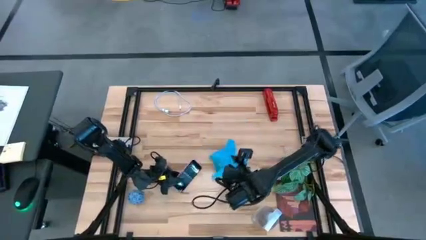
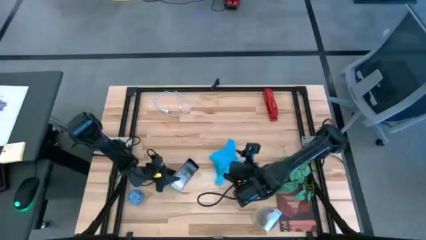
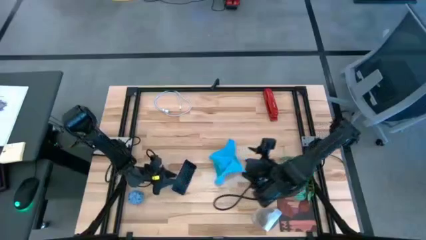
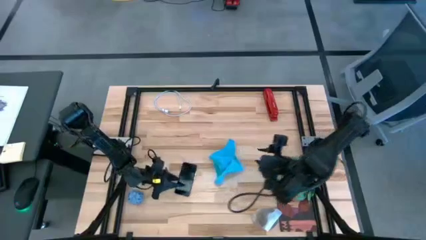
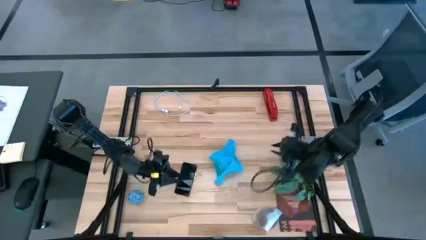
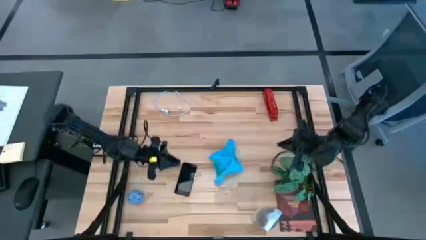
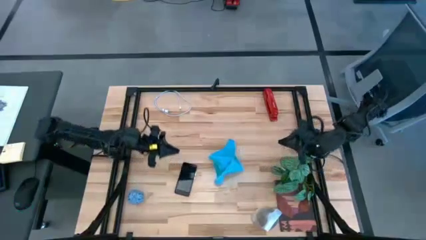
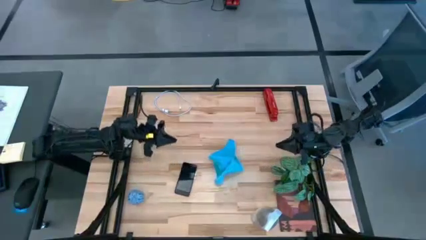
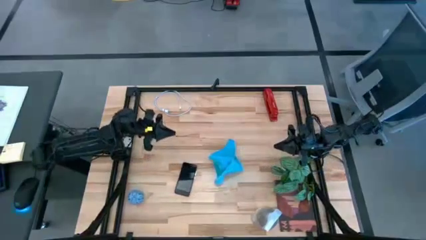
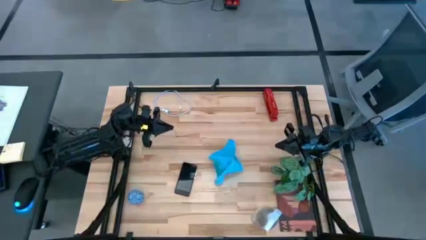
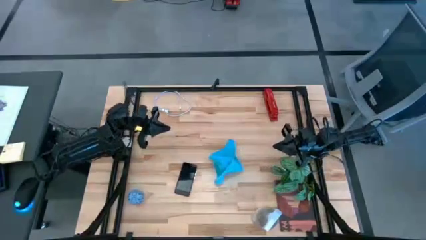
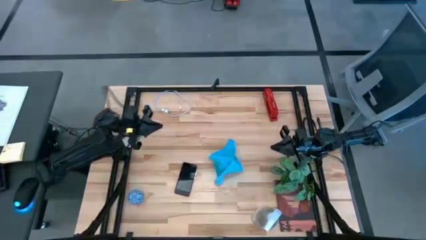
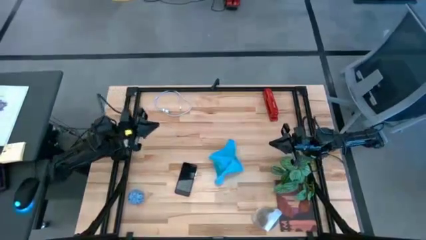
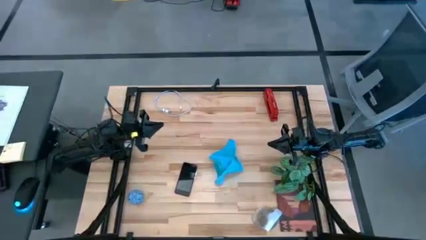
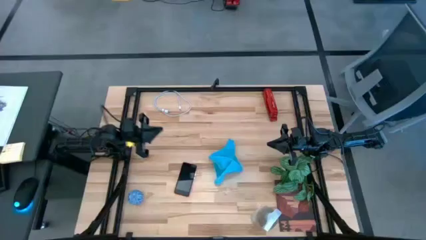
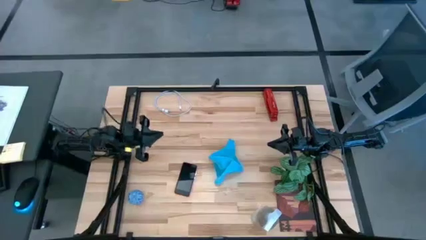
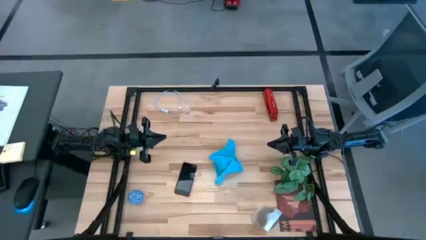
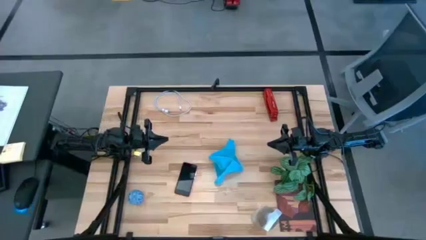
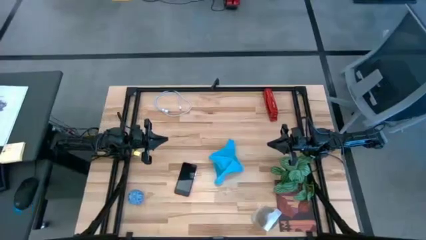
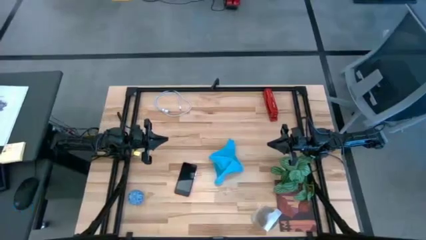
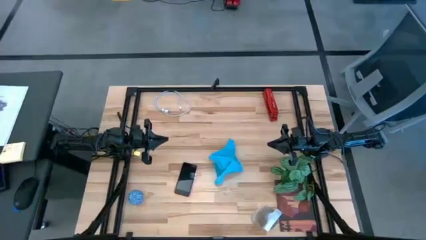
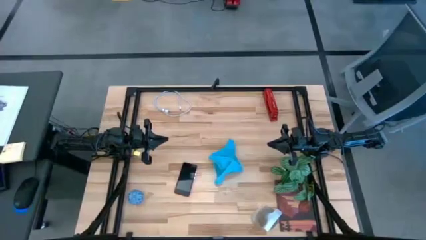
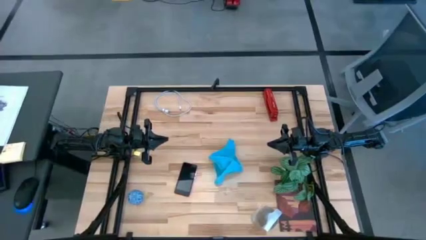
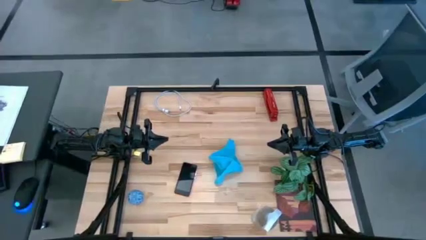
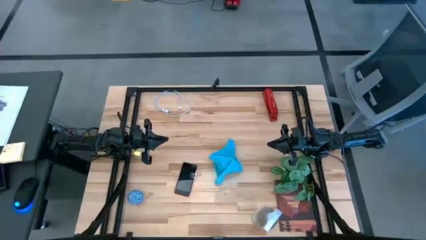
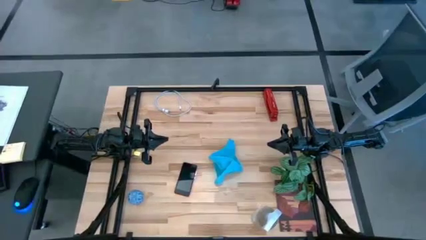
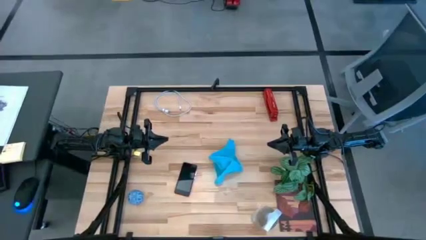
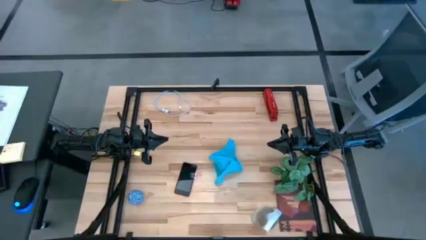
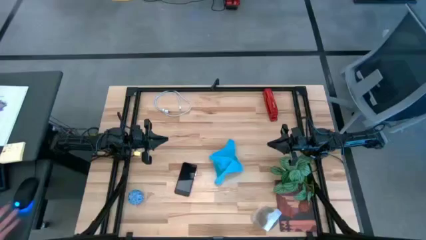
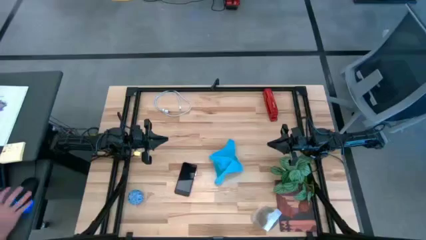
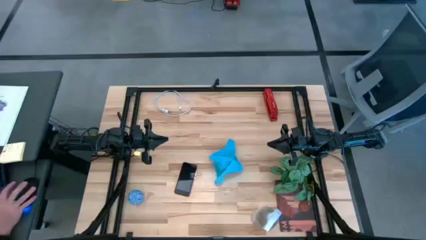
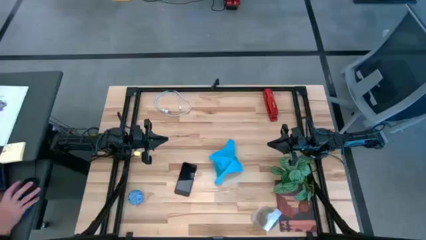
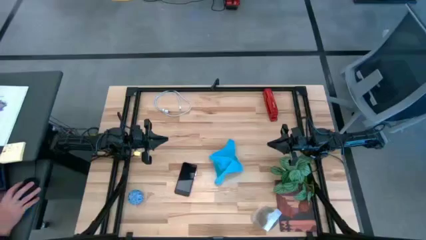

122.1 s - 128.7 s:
Task: Apply microfiber cloth
Return to Home Position

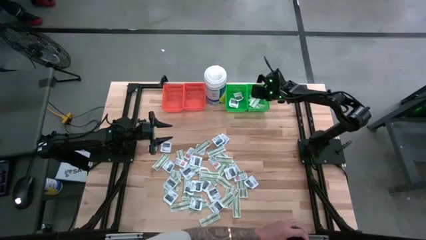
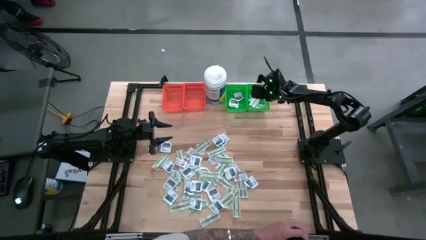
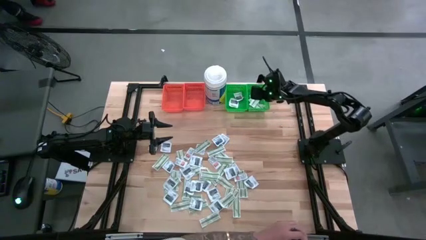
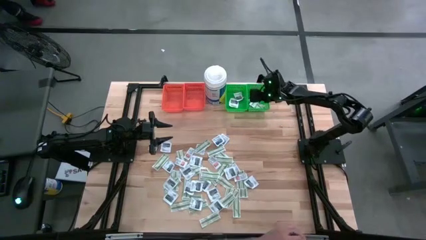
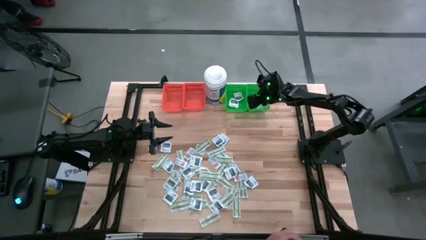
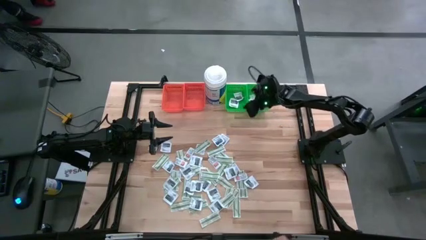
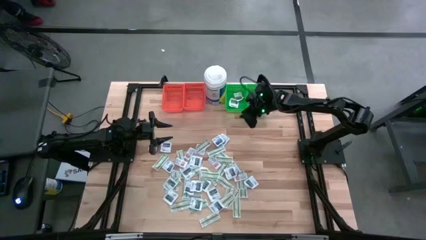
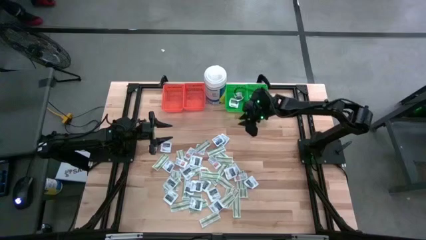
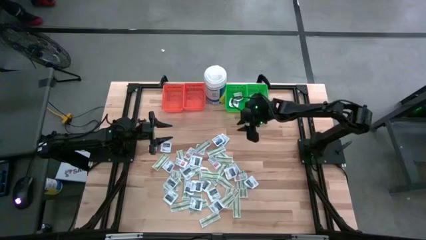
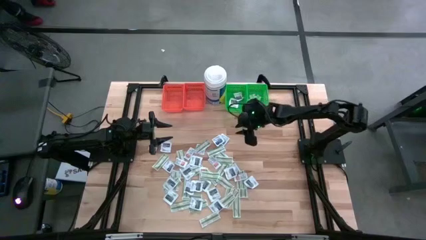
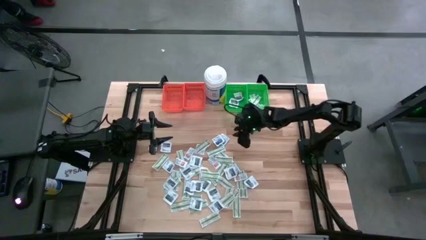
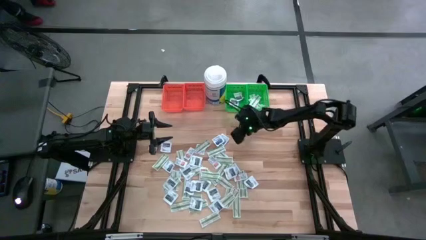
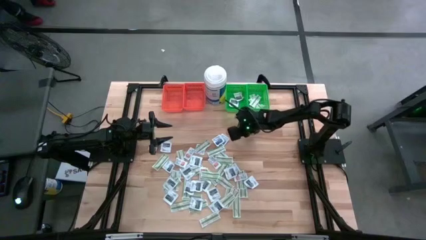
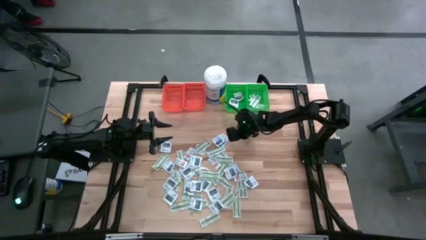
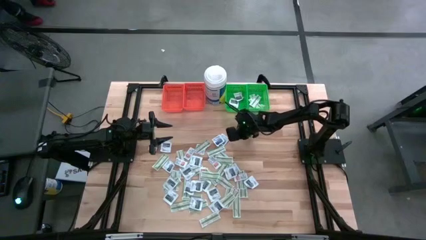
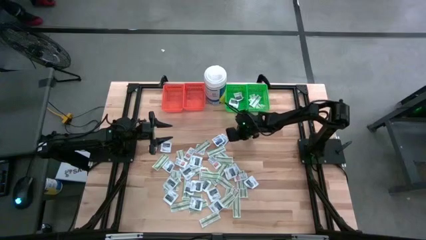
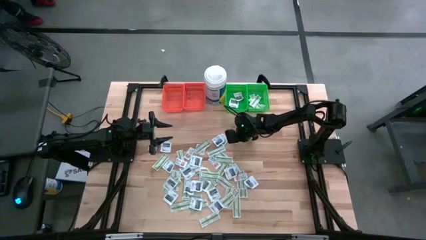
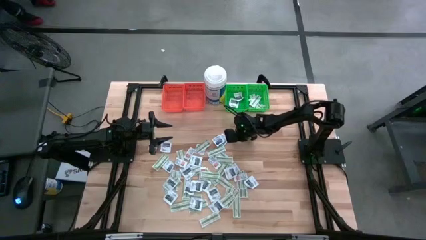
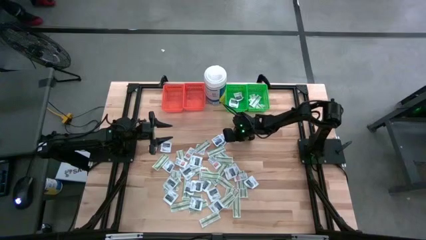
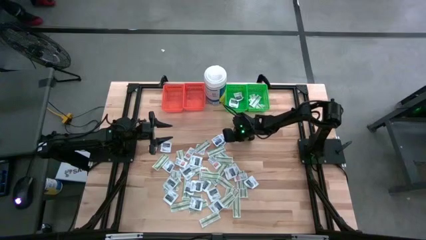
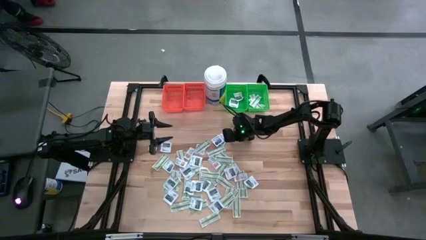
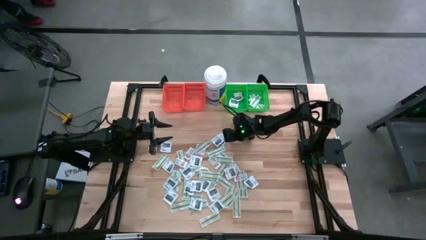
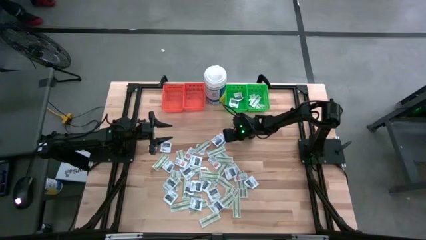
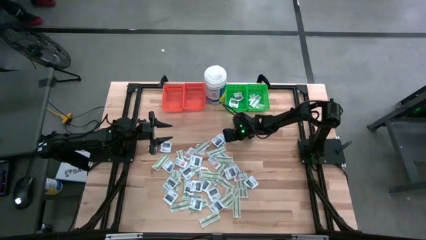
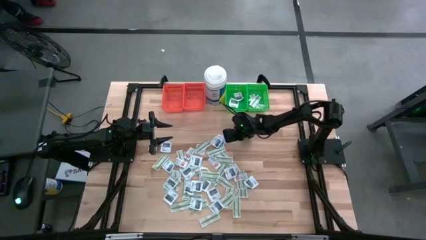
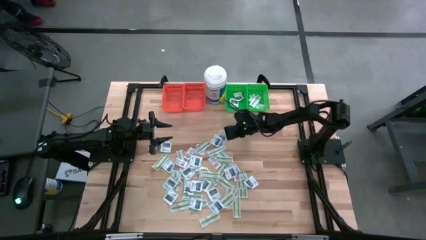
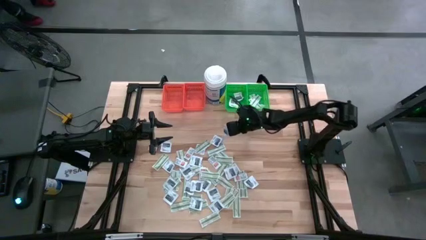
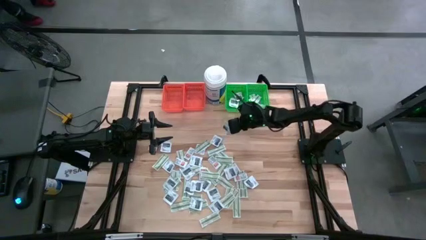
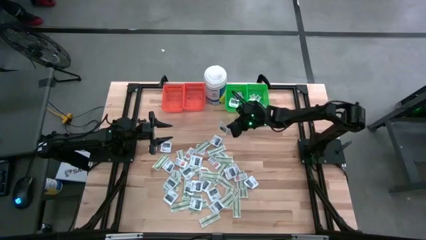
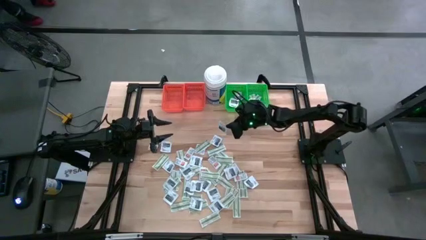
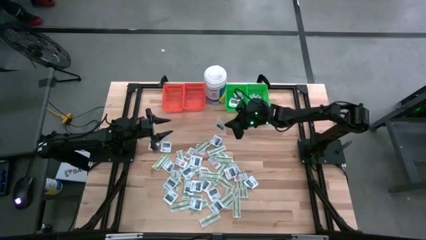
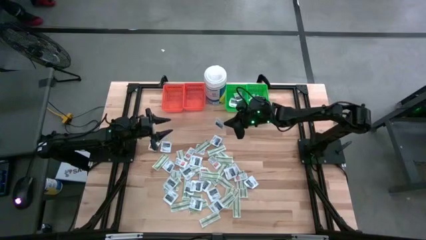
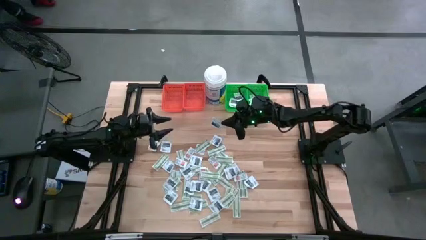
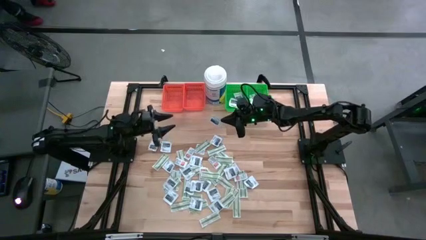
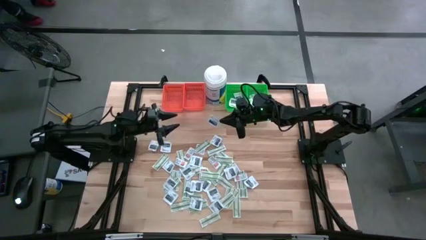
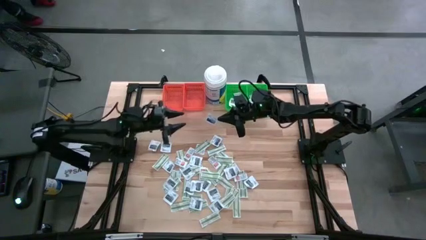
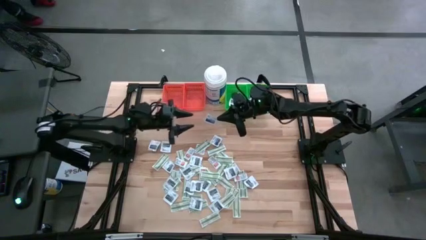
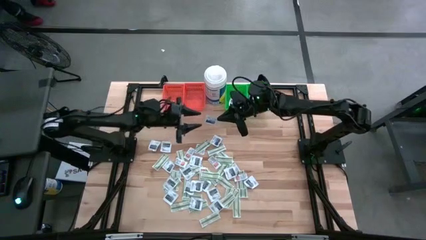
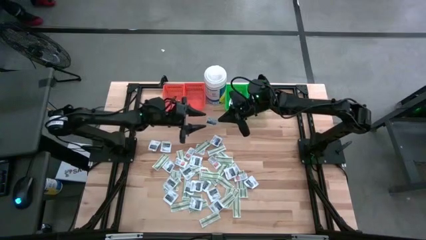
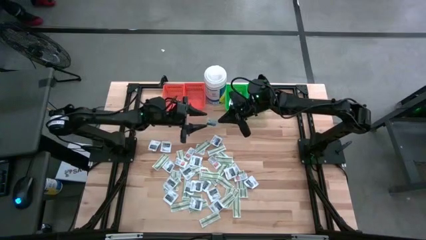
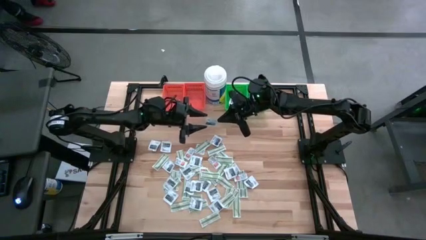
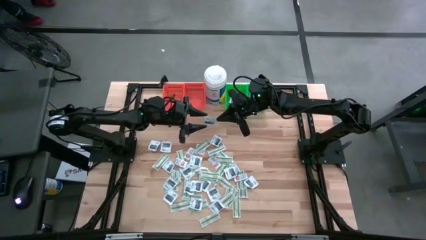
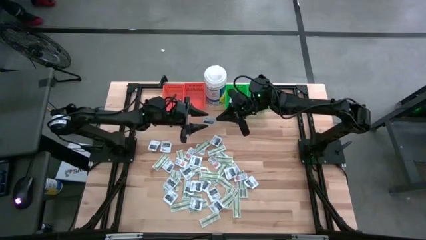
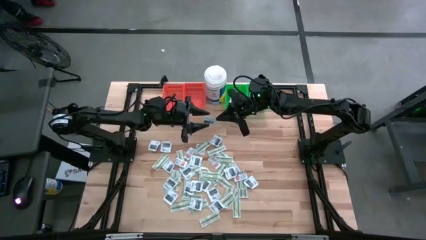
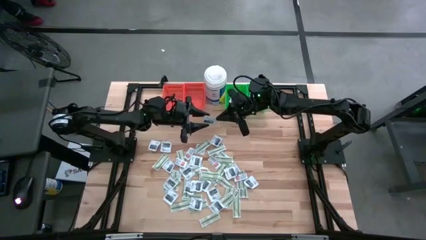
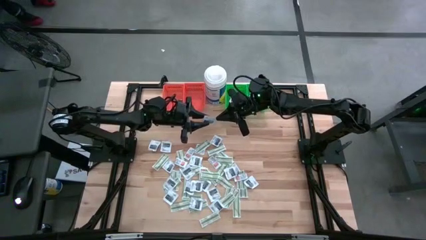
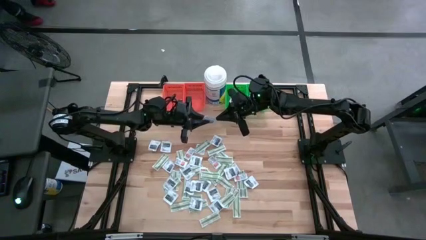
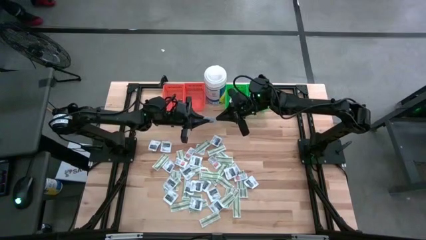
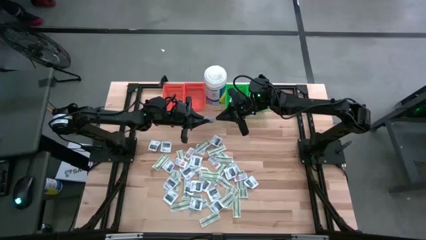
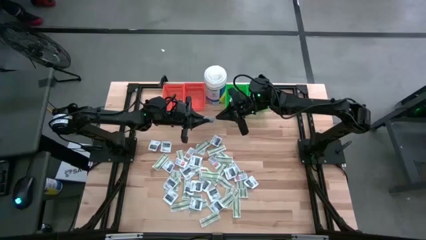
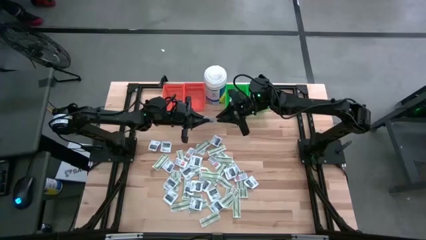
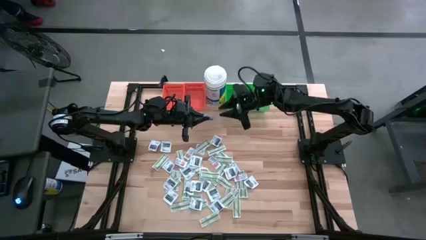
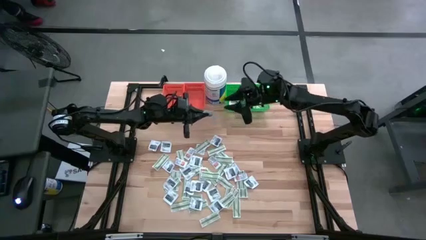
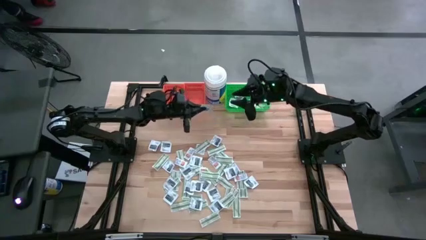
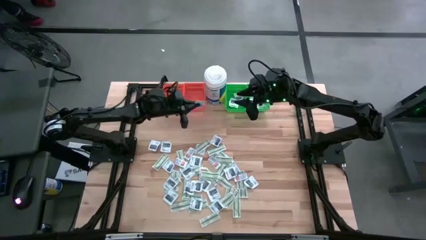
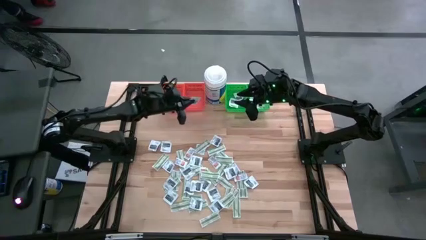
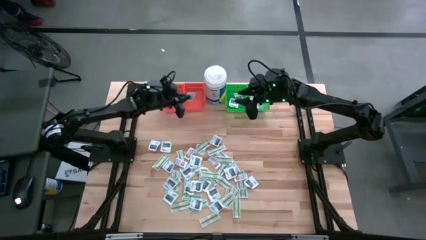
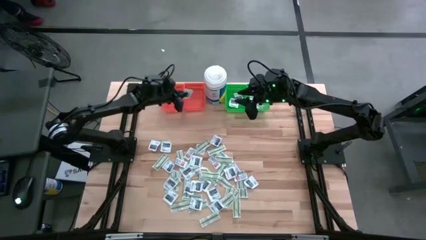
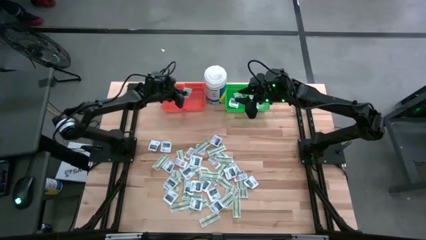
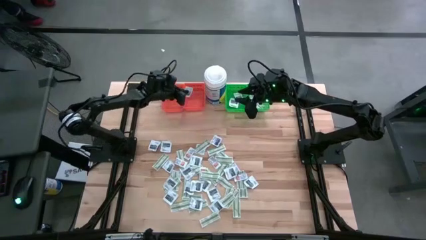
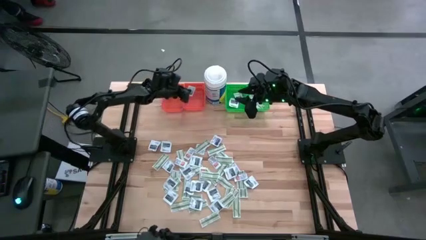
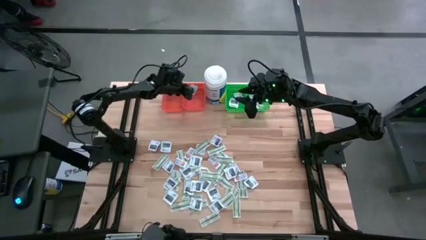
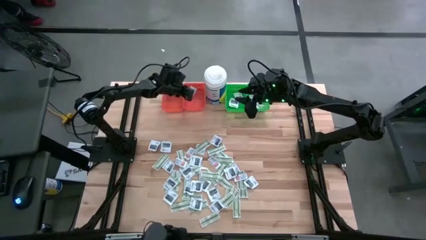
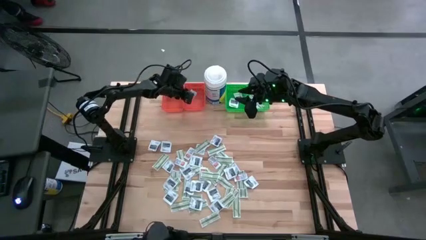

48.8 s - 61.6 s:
Task: Pick & Place First Aid Supplies
Put the blue alcohol pad into the right orange bin
